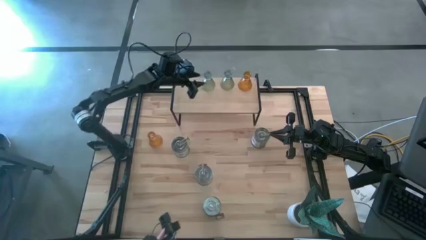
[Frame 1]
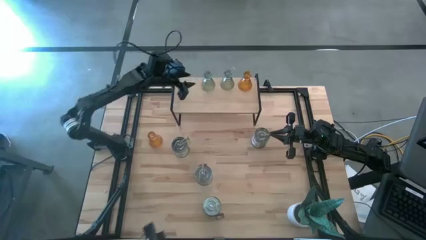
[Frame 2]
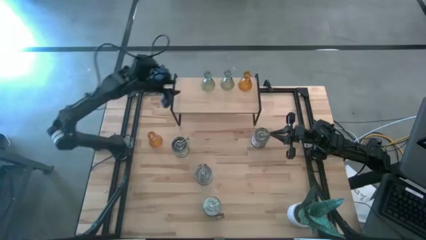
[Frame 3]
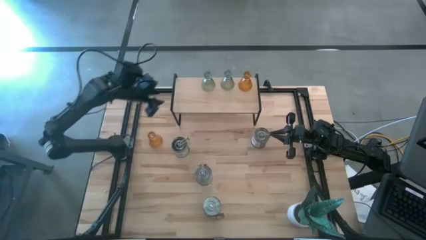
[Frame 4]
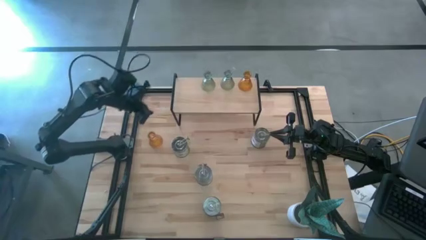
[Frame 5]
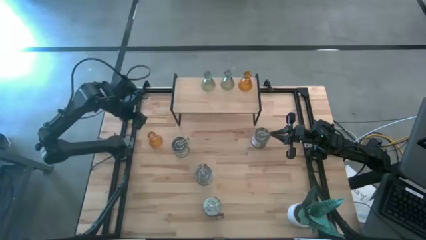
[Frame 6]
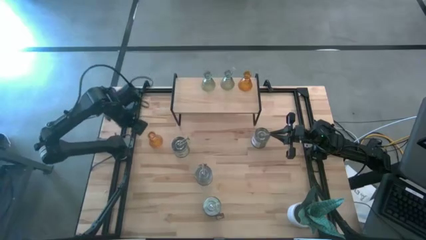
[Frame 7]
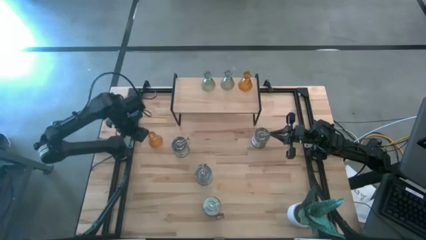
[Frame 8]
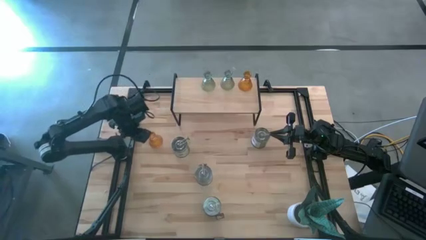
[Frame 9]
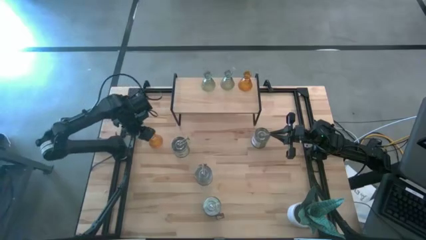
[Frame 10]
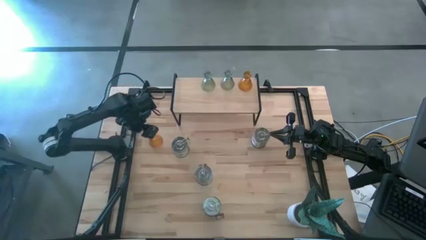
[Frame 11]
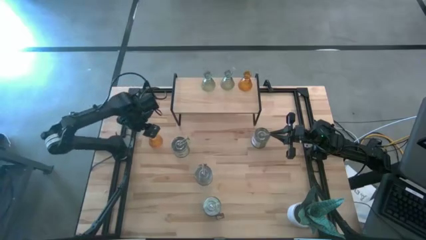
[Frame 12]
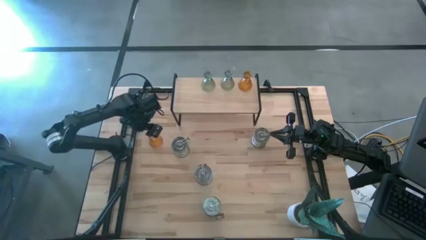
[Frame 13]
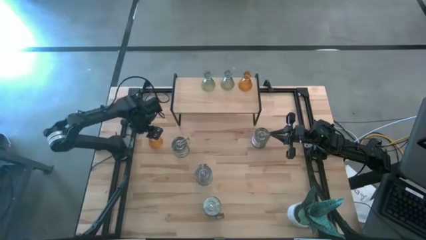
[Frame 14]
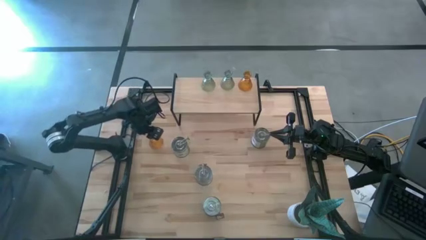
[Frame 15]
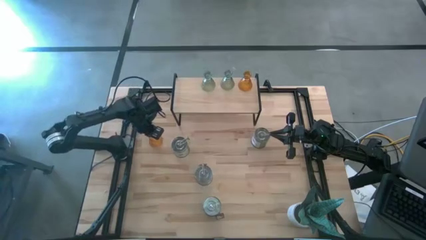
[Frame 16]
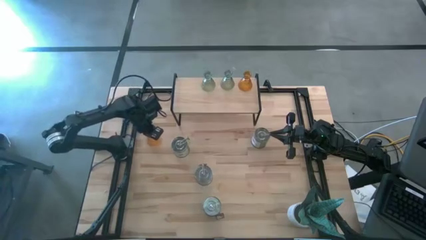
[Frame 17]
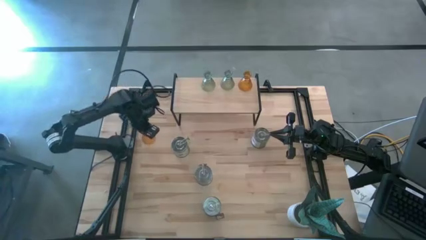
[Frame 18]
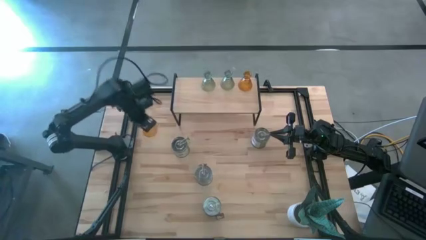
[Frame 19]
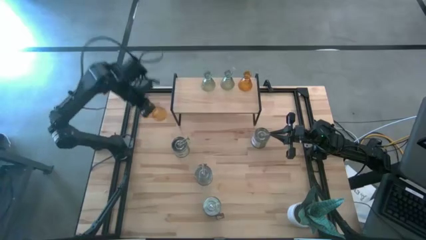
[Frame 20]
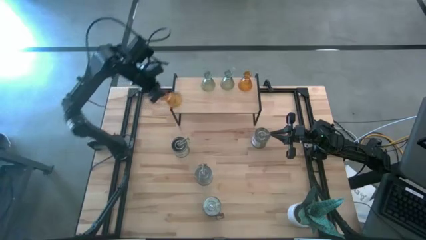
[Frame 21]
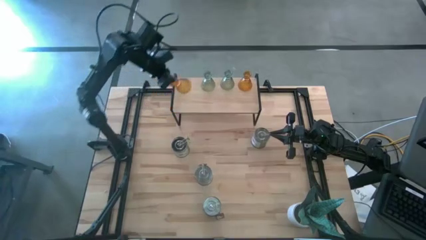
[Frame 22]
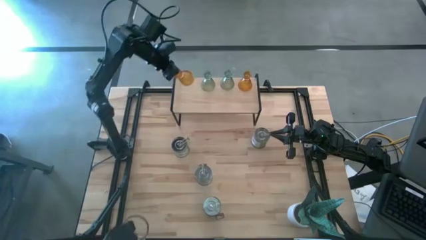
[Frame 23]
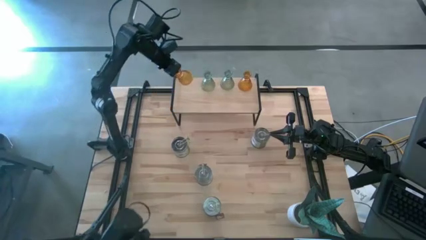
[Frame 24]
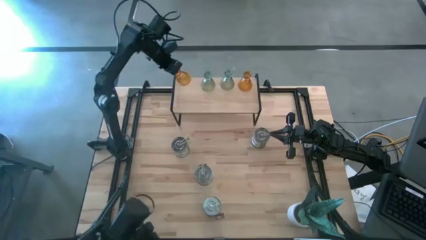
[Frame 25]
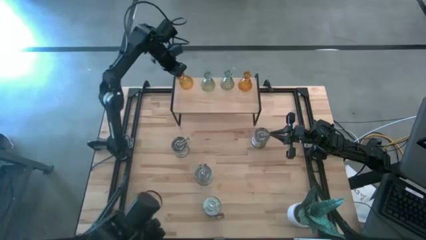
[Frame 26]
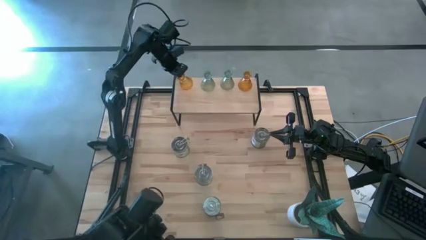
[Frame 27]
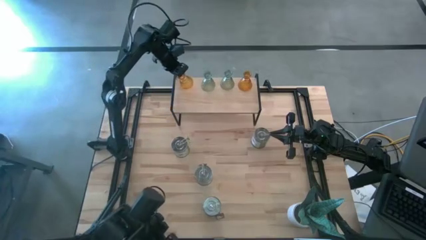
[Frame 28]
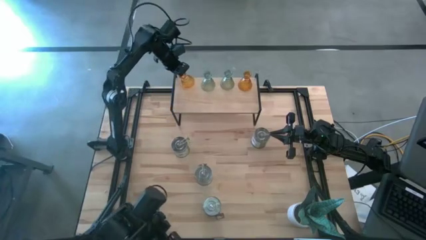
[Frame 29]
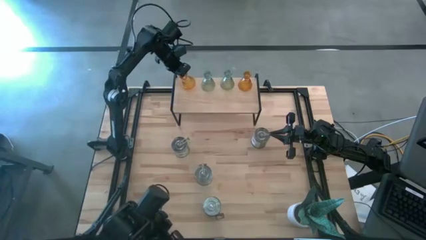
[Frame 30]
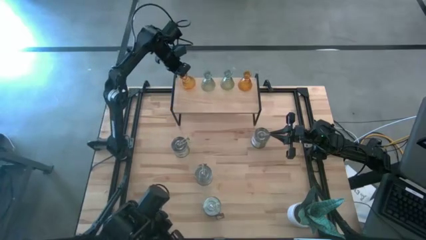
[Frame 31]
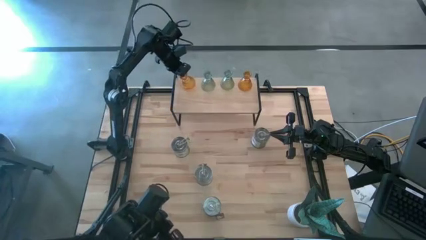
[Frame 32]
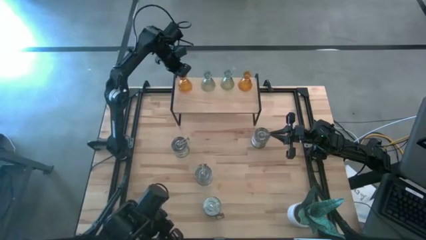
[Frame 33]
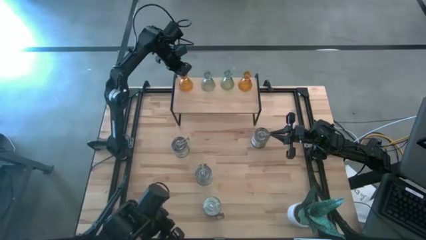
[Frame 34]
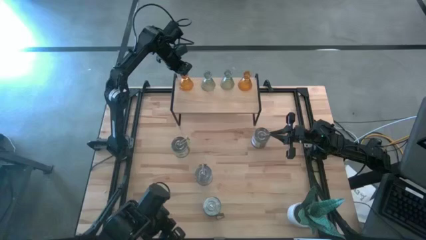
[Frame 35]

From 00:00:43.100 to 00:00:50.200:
Task: Pick & Place candle stick holders
Put the orange candle holder on the shelf aligned with the green candle holder

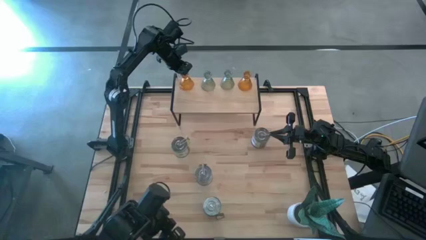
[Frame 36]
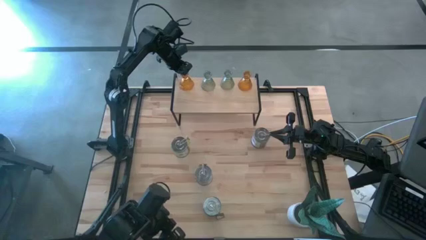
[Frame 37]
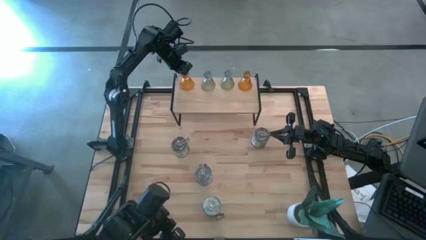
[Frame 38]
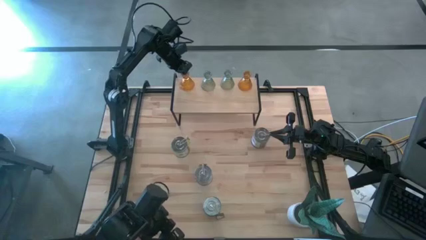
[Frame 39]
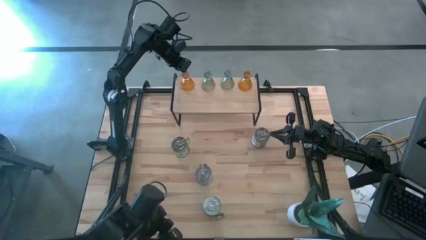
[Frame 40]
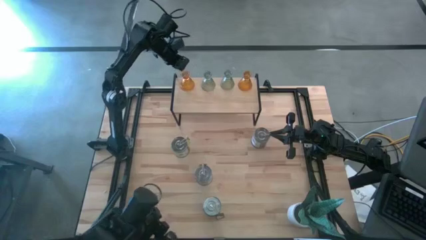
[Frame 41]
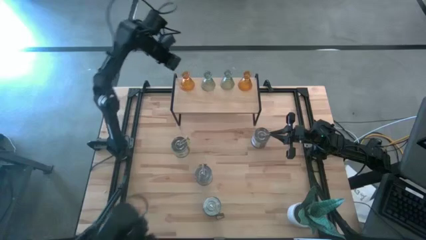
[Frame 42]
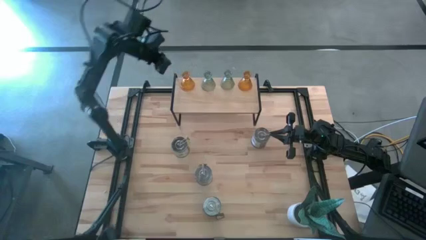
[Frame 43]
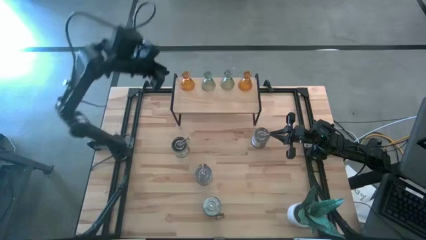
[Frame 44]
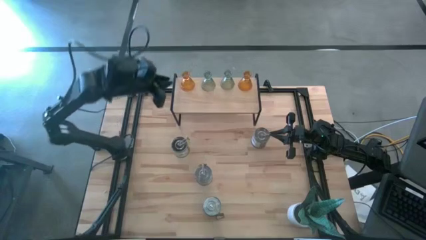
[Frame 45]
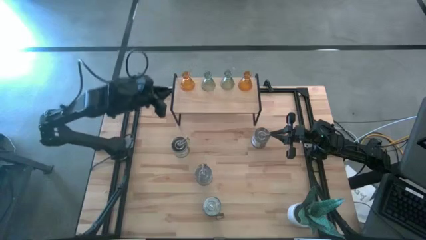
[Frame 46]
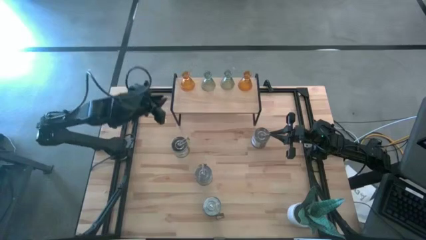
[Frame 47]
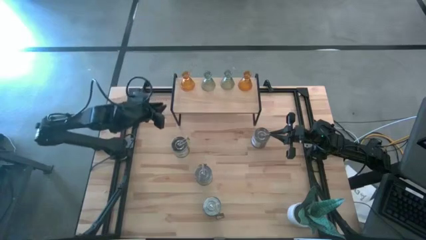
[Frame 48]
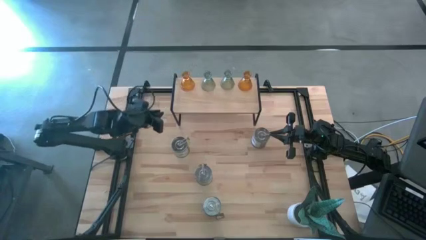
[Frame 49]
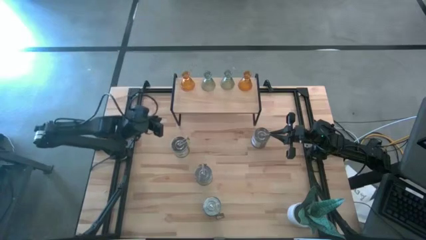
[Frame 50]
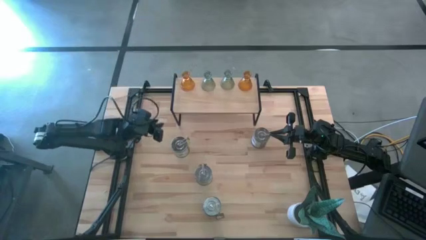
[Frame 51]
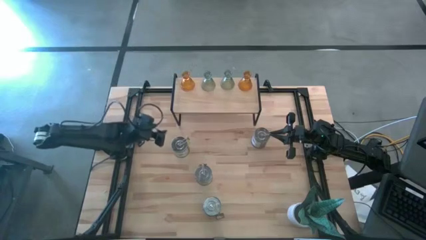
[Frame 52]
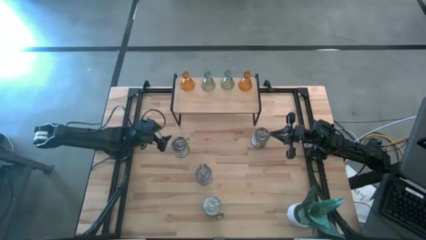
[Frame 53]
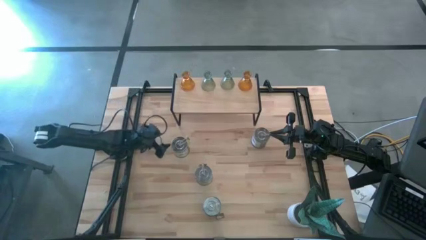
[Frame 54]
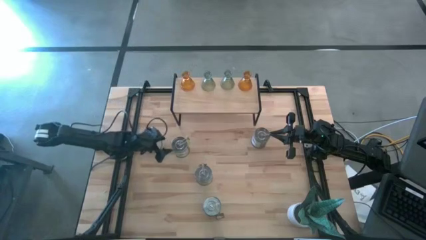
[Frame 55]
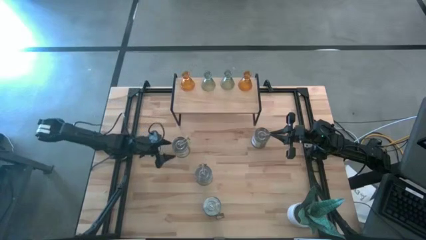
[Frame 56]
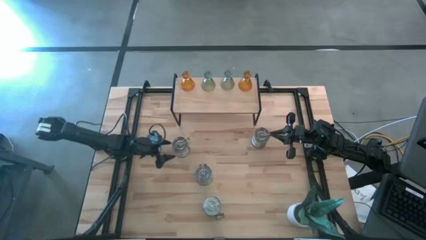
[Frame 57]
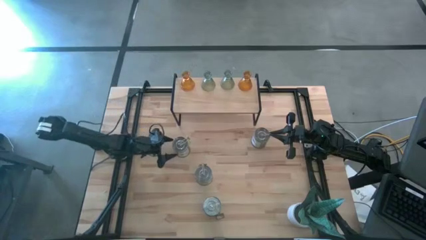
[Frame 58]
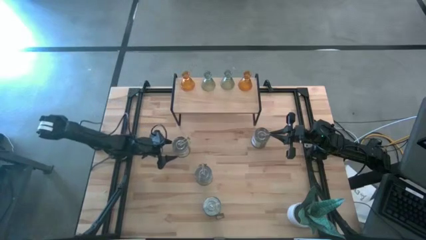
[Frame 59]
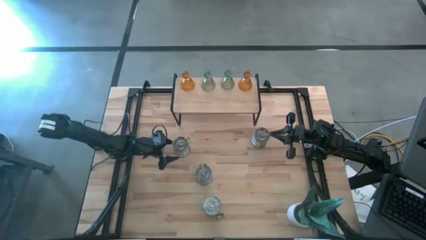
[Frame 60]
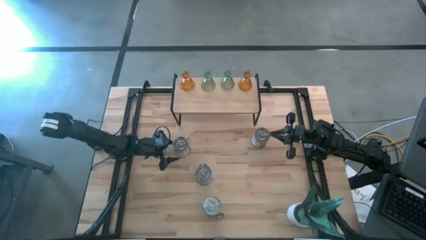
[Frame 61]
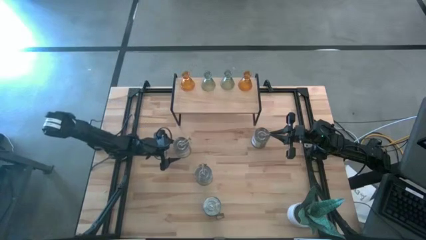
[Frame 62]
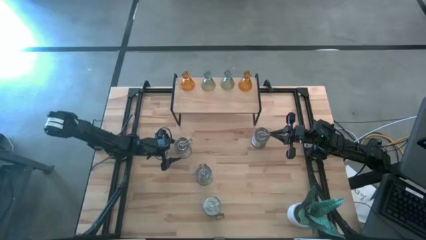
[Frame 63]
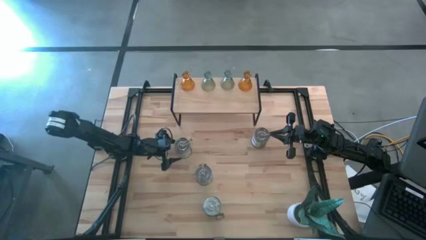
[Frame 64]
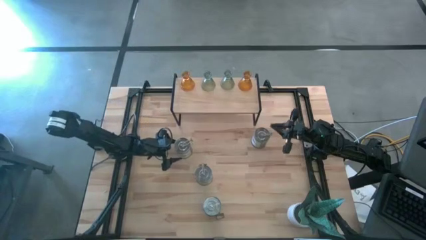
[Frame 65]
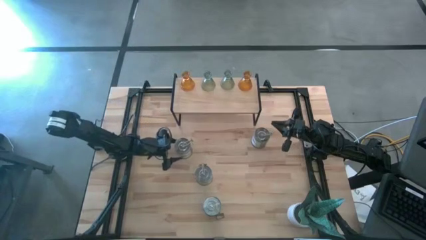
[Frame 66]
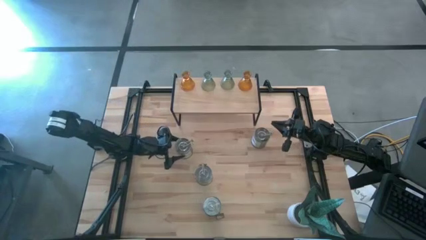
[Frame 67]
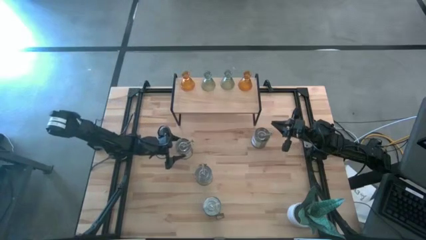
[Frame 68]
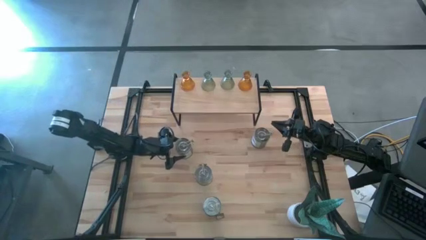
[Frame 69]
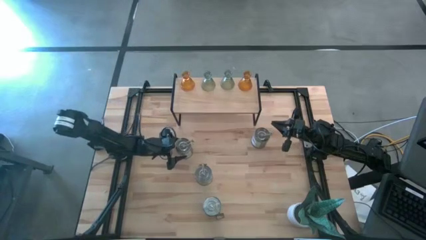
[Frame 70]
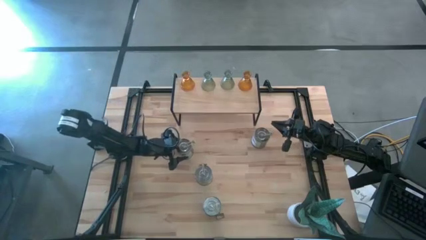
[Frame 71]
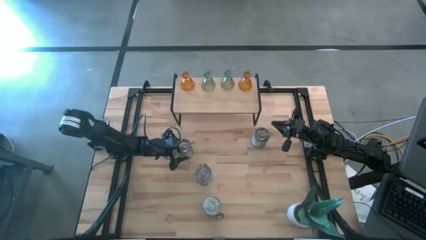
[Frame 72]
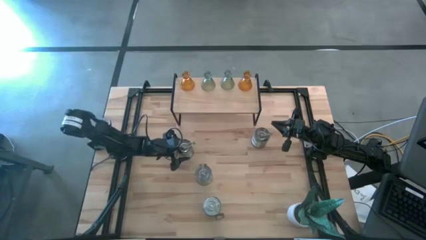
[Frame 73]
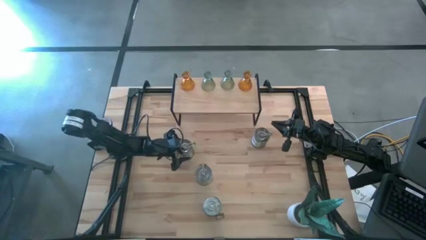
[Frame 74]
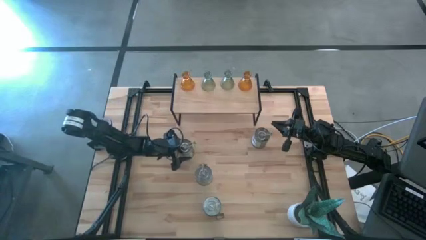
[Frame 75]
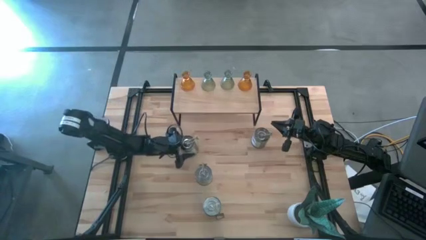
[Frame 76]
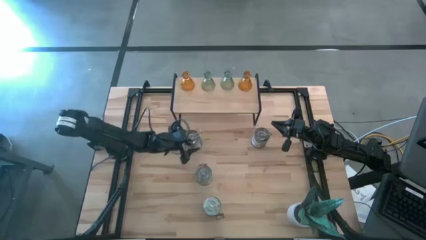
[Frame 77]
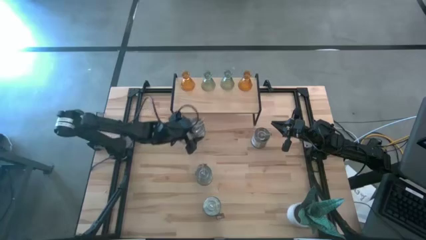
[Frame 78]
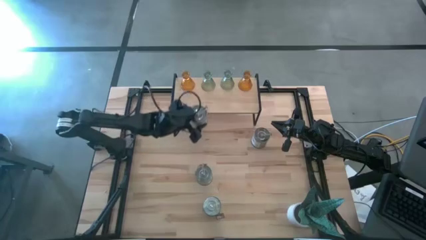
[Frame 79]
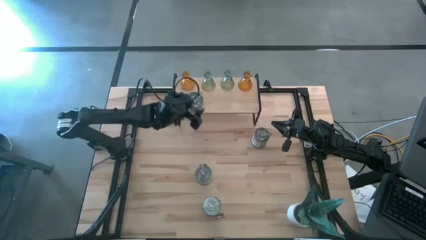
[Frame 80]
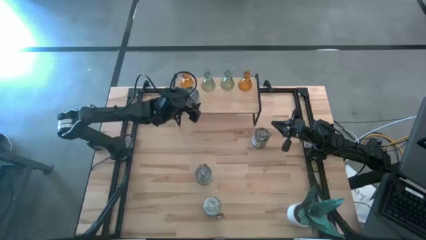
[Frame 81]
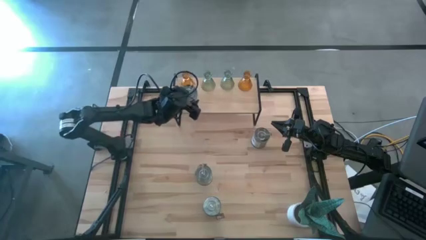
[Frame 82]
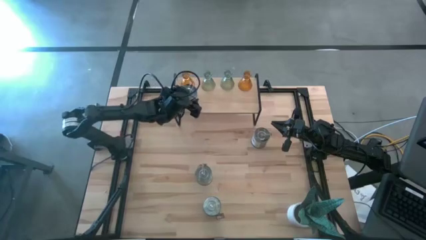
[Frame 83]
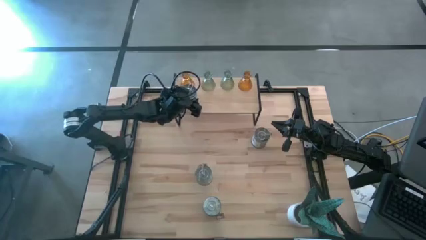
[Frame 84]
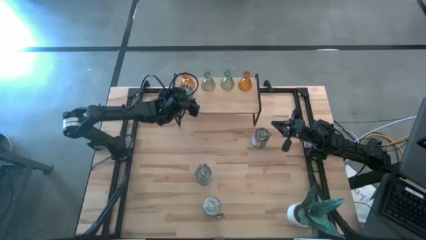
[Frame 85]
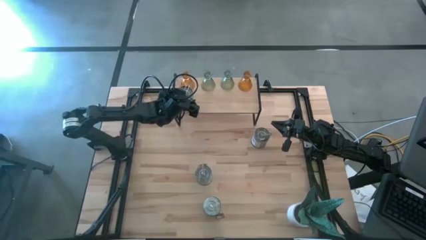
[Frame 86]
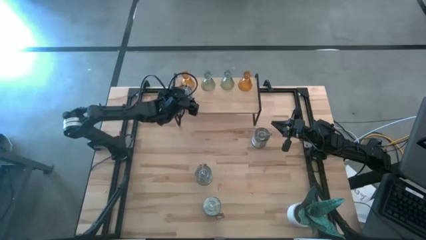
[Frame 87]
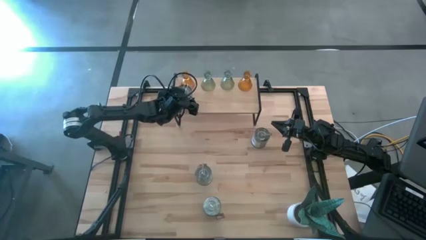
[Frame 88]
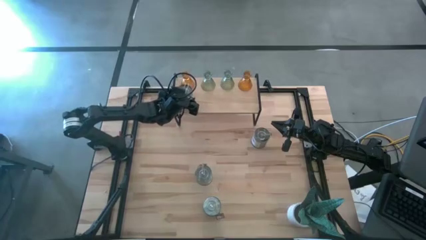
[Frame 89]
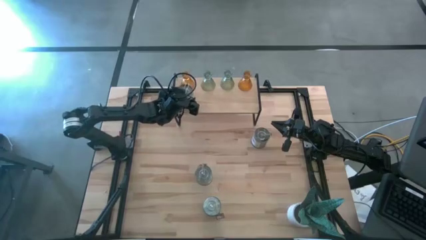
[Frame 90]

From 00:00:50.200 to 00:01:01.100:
Put the jar candle on the shelf
